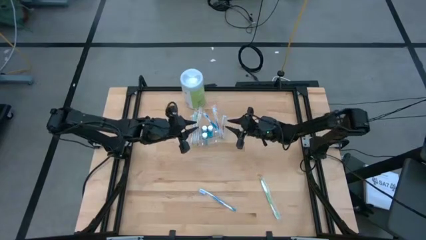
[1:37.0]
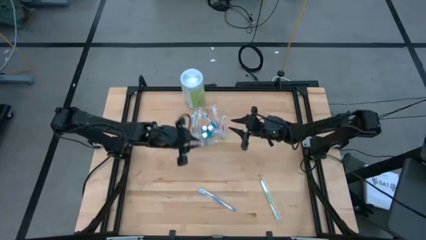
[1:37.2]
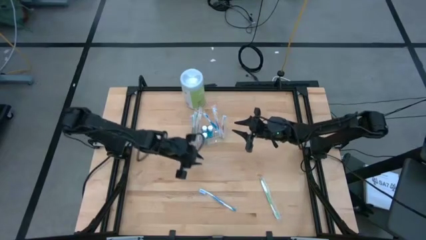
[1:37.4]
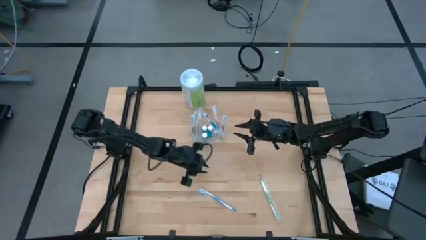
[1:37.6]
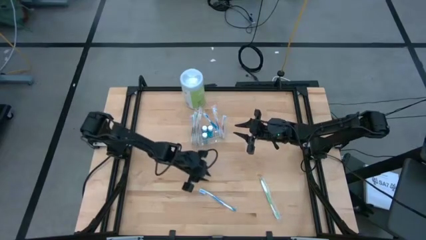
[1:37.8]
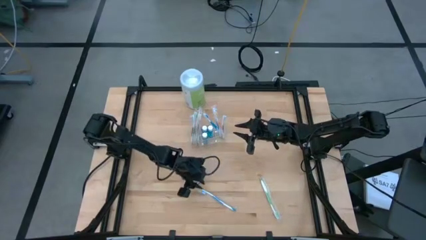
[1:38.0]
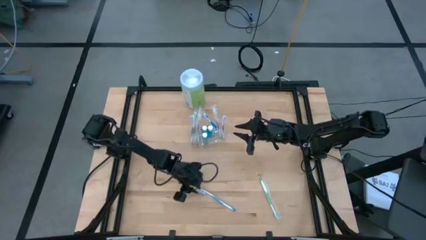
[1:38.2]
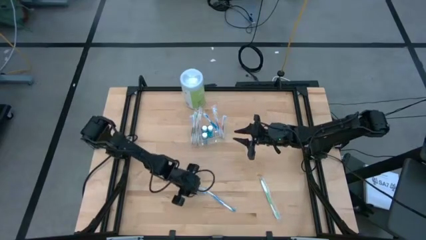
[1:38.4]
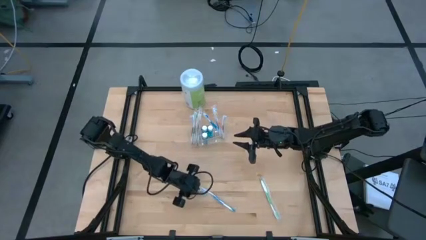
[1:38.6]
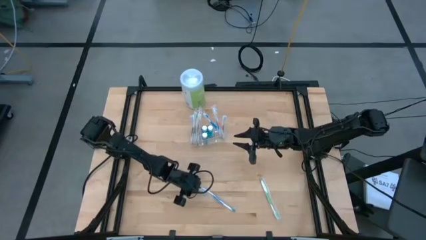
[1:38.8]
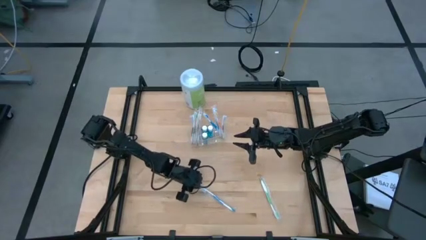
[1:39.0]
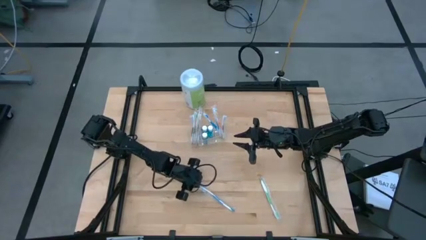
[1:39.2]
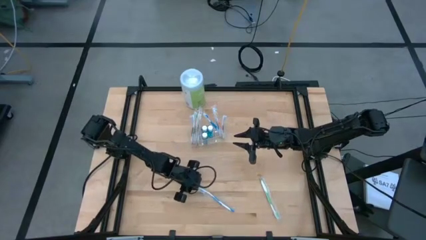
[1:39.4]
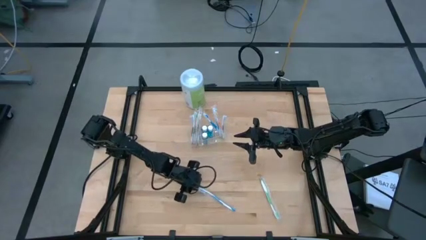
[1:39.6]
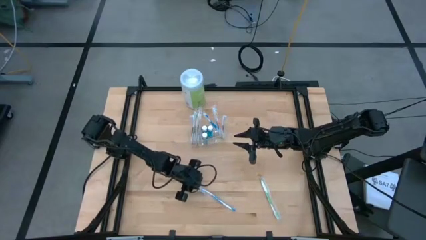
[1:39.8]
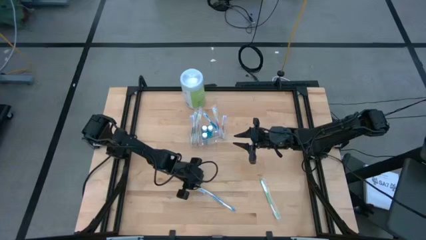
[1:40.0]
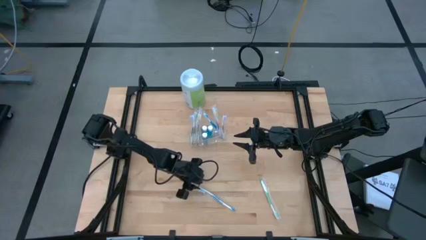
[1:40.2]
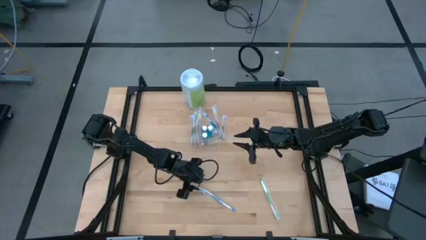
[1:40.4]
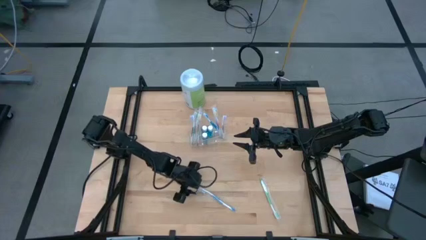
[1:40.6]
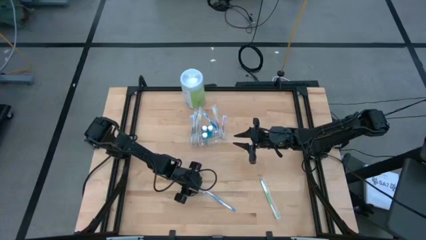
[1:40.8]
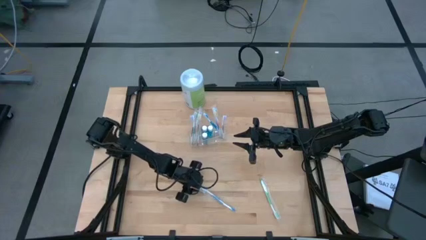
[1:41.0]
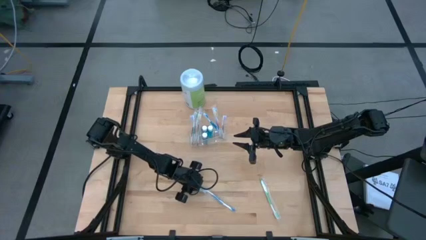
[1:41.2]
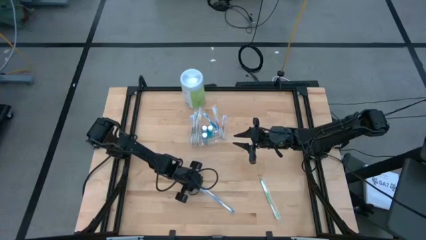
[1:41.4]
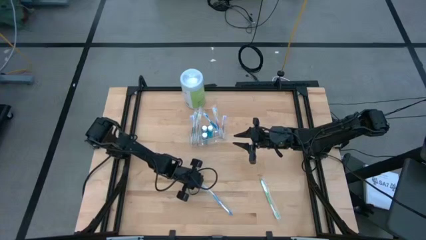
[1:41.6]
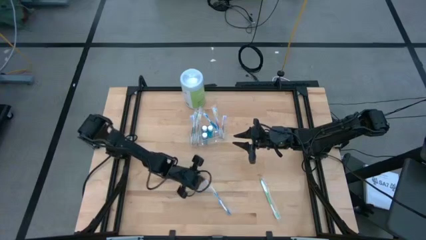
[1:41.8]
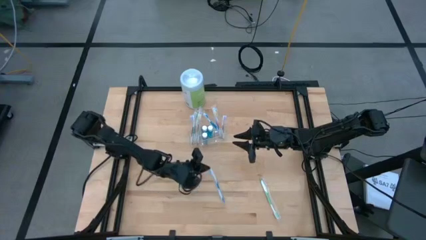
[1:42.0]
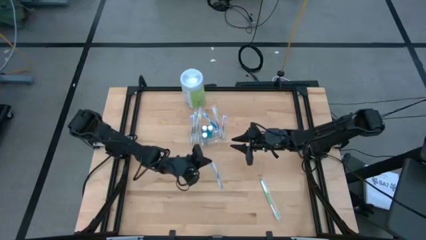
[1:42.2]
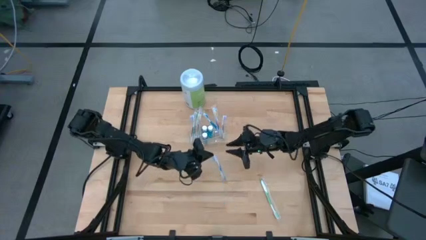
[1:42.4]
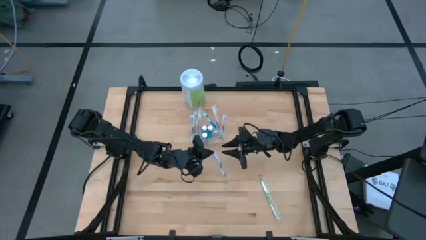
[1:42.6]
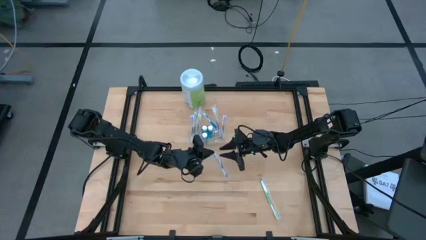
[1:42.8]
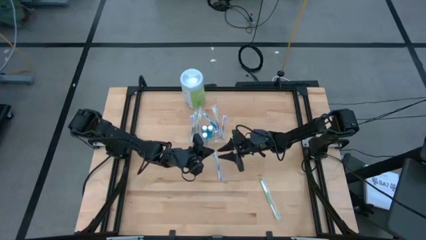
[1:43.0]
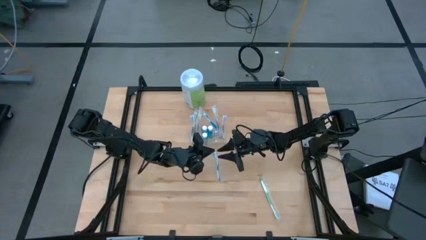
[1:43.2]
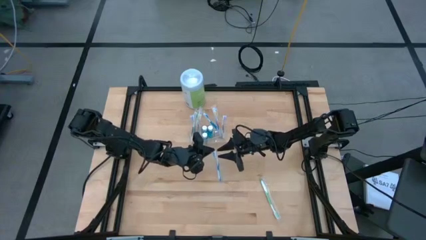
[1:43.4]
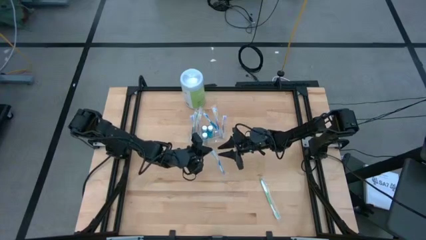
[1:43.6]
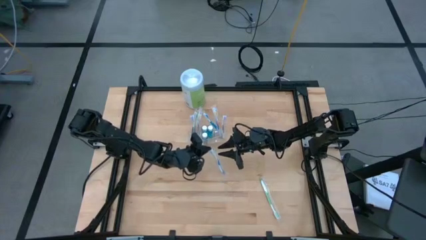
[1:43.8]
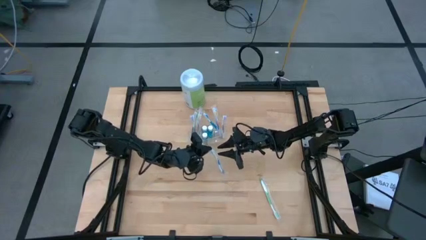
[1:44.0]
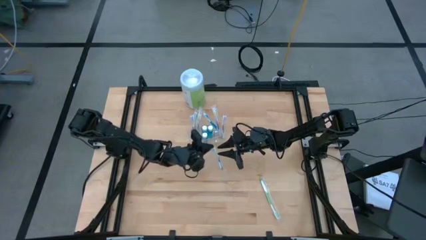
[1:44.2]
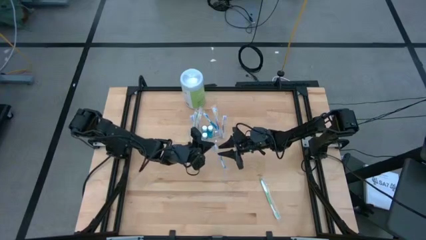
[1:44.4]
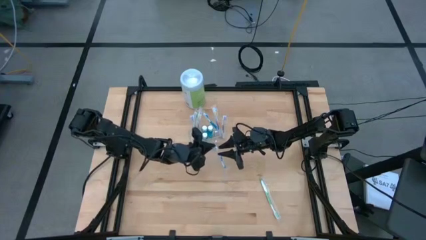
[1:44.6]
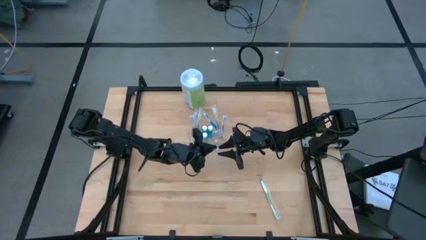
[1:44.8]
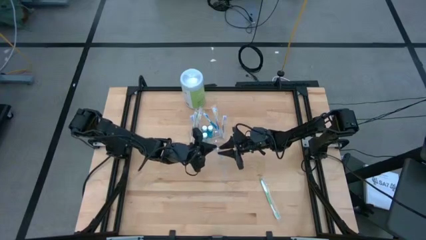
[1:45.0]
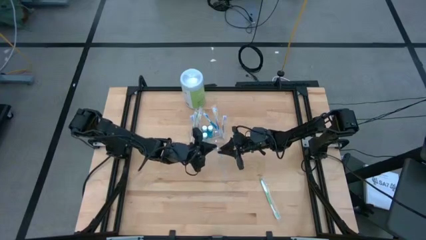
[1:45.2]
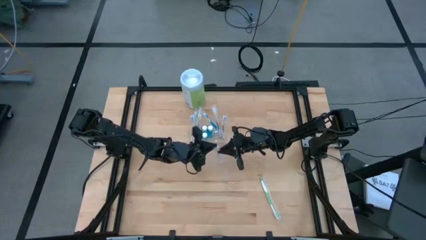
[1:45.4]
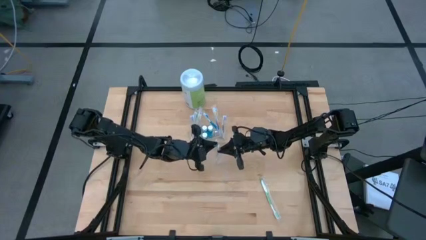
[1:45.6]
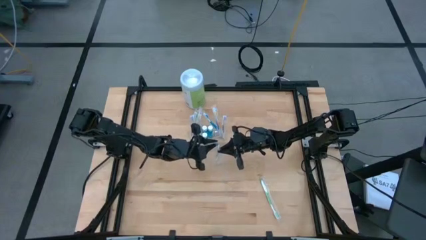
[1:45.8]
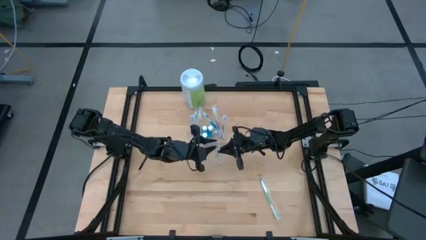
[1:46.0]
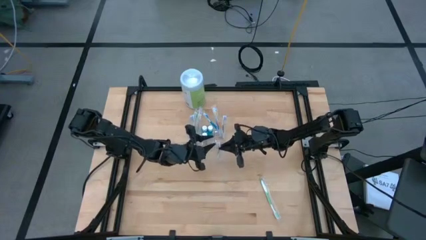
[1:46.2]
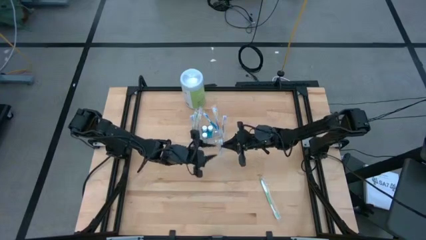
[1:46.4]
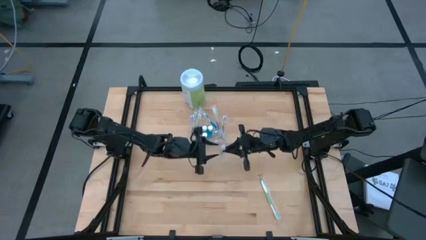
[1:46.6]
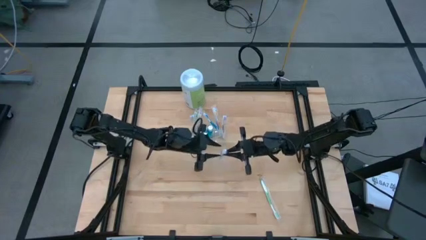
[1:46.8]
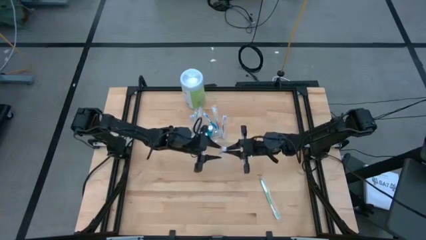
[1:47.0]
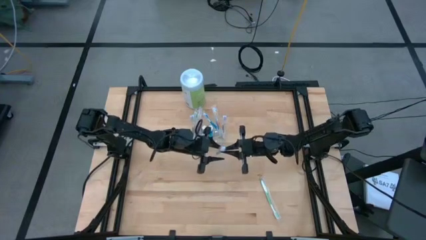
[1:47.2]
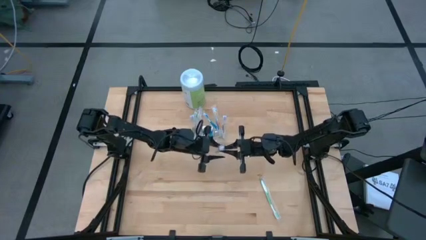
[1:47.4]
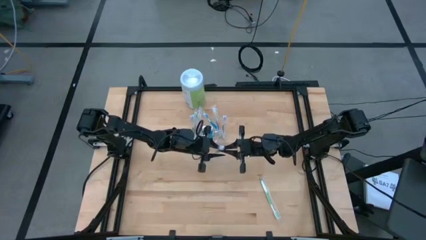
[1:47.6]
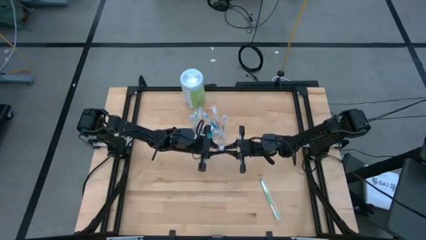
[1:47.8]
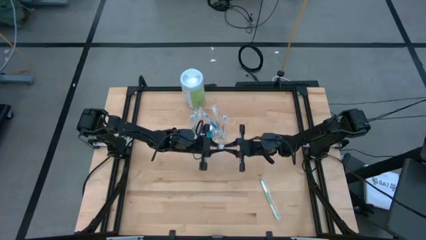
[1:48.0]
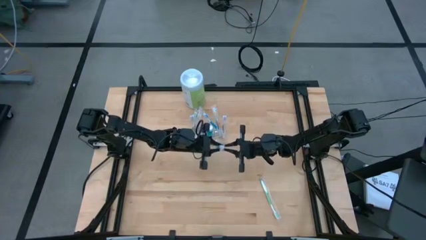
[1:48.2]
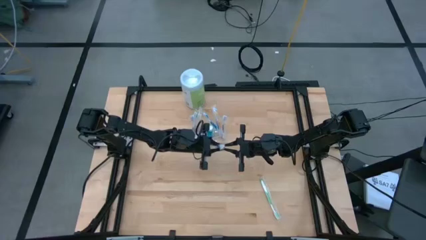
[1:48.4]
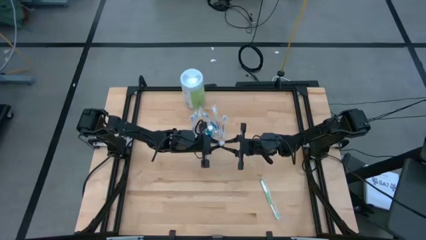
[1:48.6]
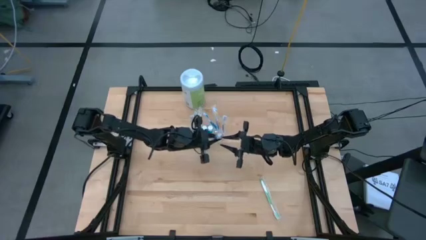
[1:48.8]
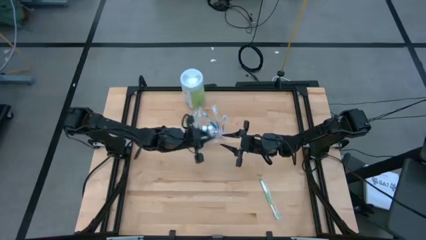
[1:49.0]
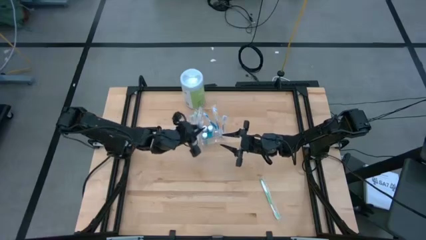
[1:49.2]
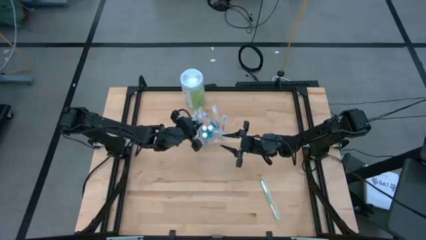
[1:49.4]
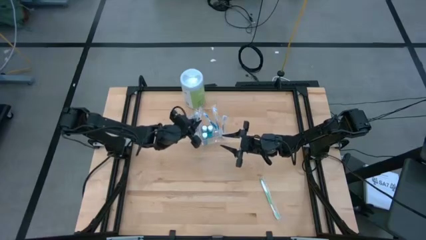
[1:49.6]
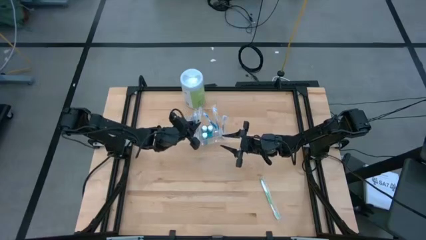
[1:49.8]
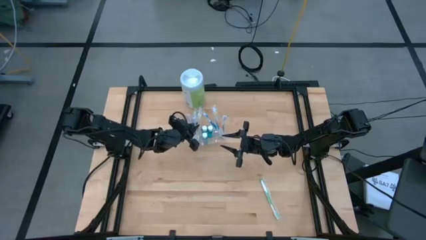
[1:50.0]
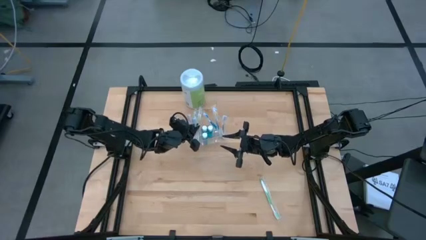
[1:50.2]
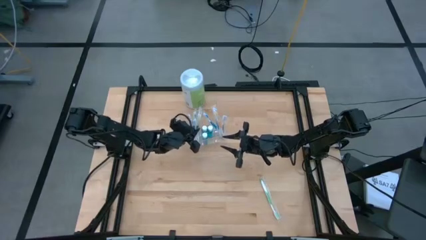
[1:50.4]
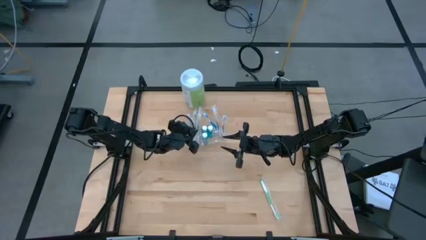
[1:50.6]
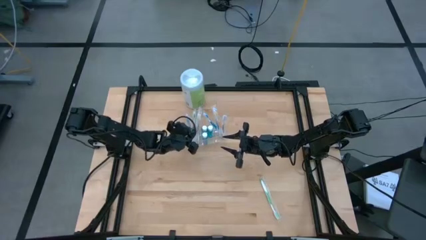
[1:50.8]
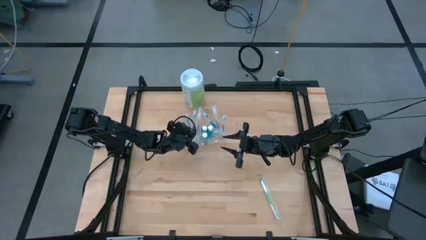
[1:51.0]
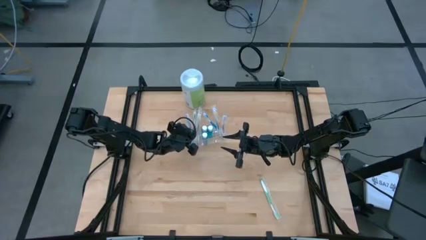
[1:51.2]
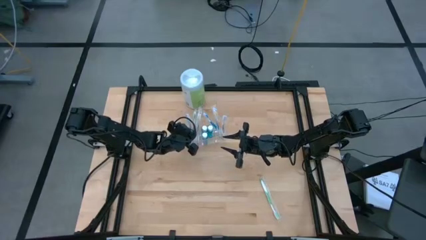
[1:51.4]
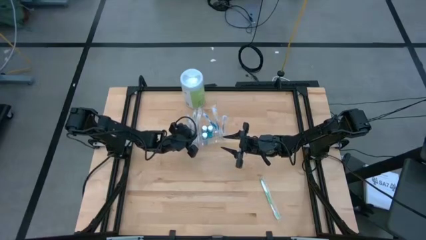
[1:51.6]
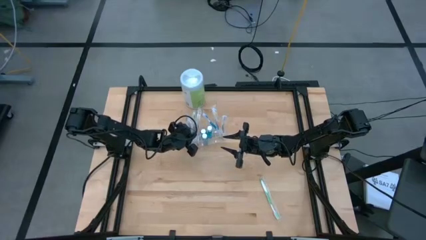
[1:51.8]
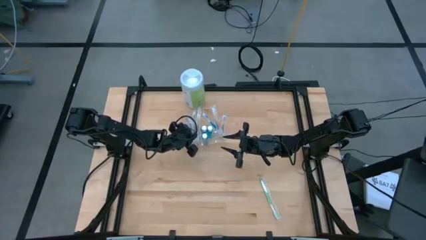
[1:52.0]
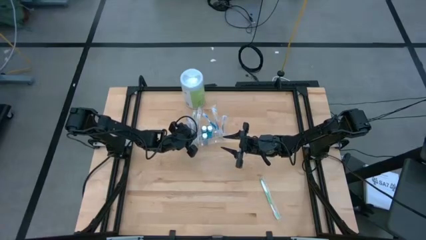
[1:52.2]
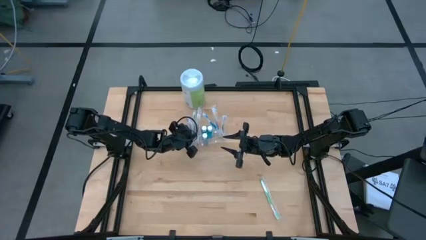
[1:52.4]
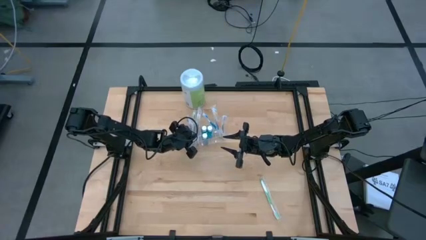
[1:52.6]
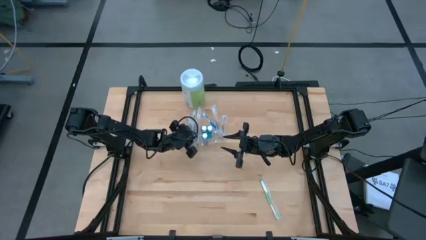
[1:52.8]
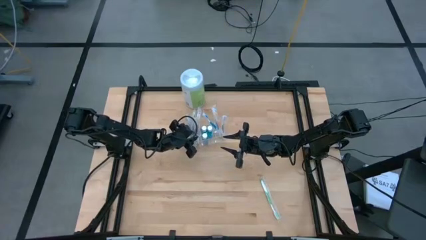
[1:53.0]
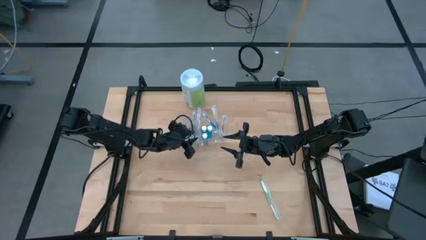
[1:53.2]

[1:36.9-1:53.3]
Task: Pick & Place toothbrushing station
Put the blue toothbrush into the left side of the transparent organizer
